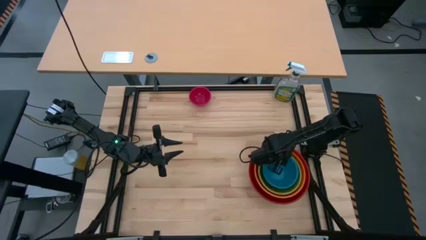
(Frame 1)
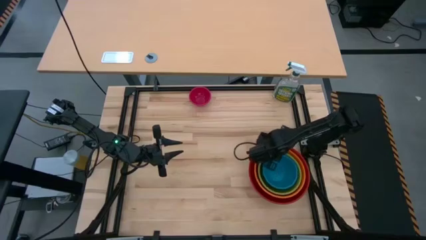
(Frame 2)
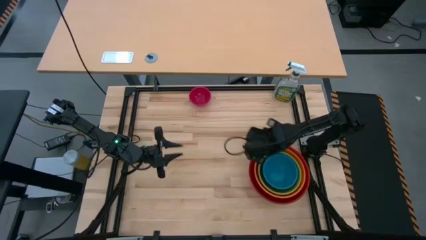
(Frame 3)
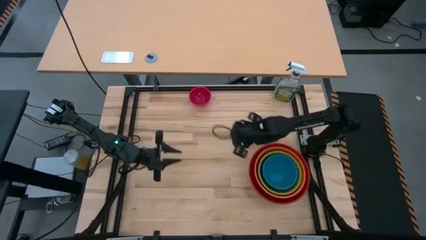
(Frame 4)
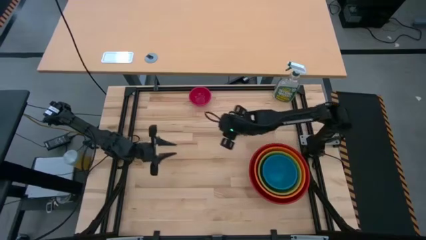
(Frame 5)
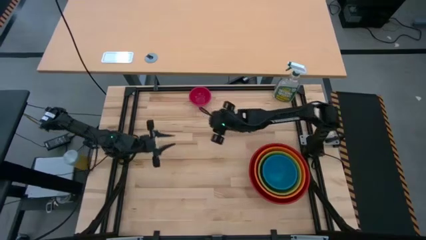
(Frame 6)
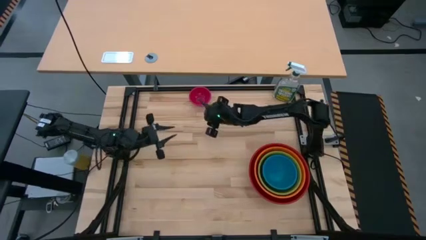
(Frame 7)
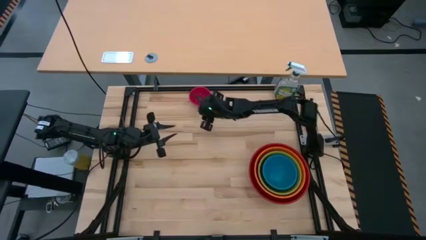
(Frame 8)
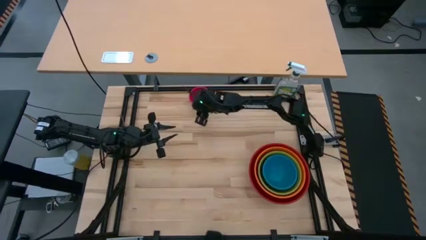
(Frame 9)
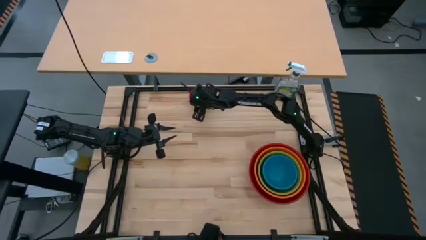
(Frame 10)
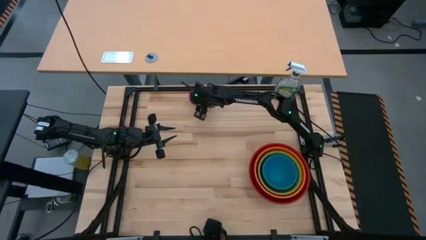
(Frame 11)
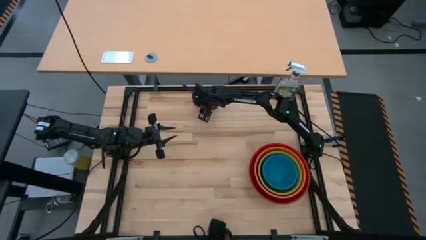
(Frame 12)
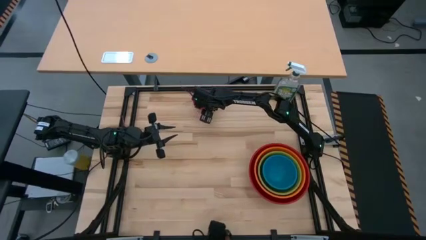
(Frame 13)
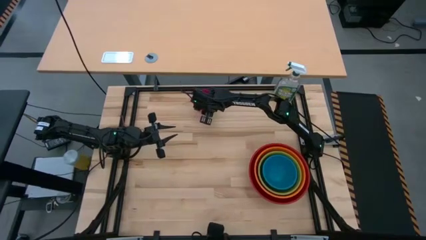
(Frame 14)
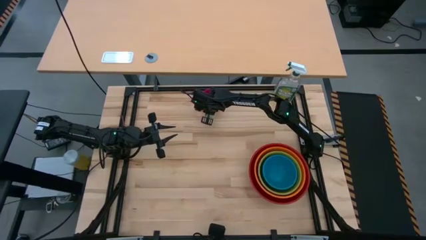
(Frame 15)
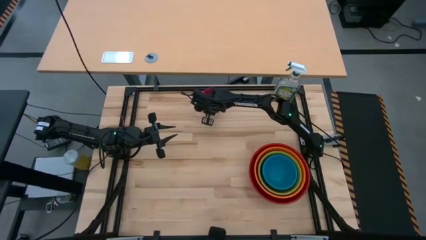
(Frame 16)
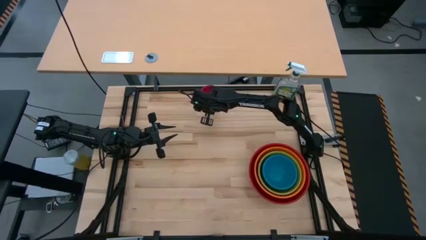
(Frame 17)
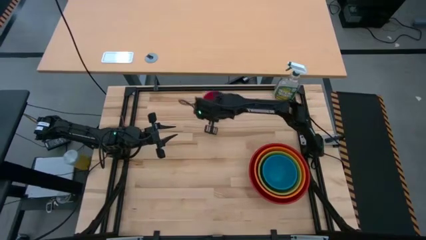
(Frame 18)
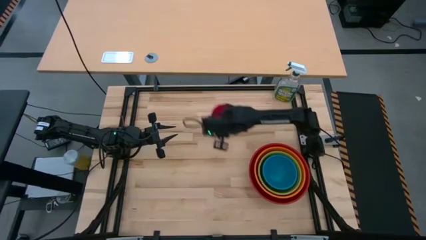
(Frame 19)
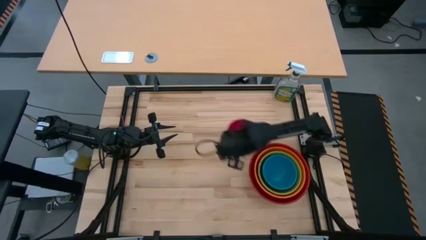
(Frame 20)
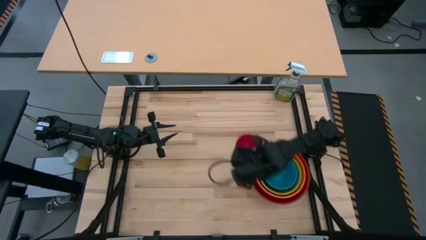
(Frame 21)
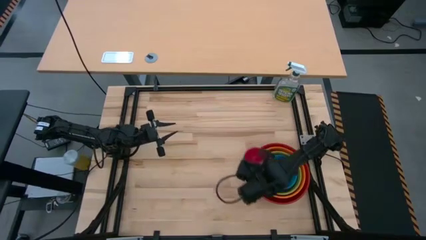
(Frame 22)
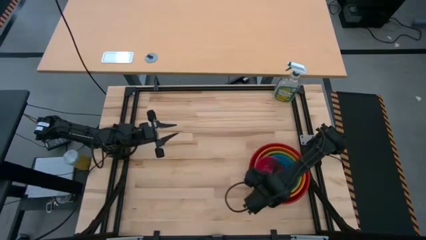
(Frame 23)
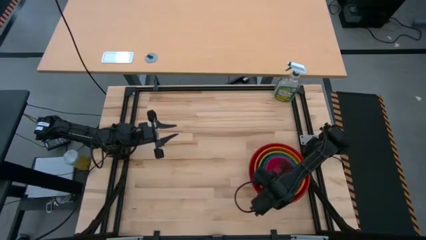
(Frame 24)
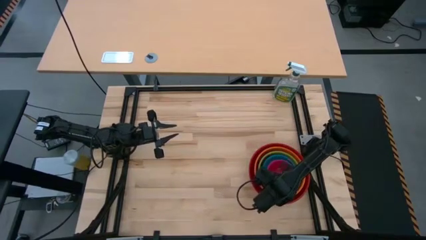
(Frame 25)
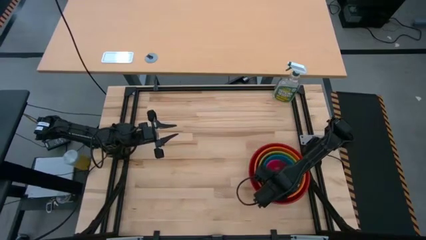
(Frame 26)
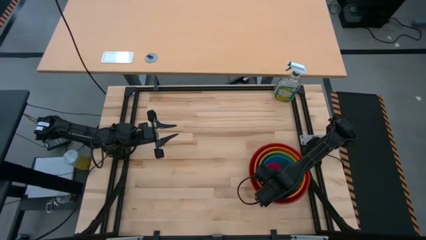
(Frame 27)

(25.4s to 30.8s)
Stack the red bowl on the blue bowl

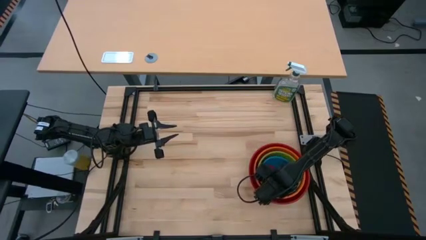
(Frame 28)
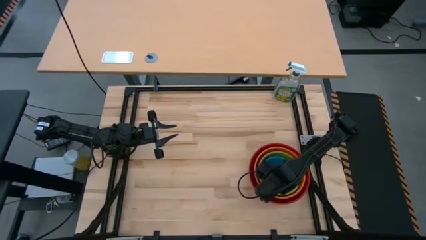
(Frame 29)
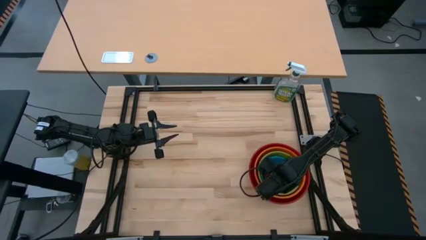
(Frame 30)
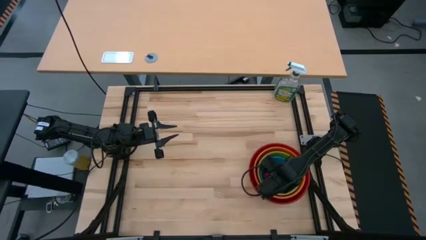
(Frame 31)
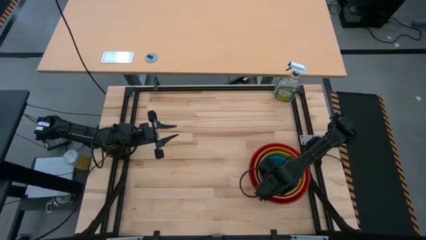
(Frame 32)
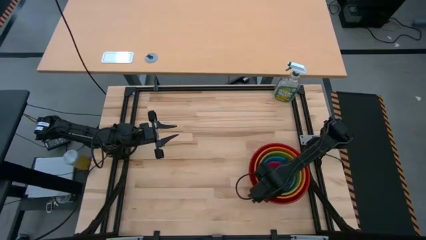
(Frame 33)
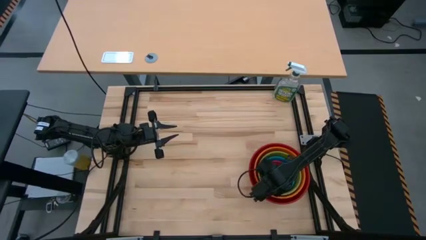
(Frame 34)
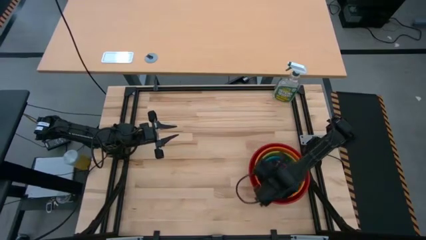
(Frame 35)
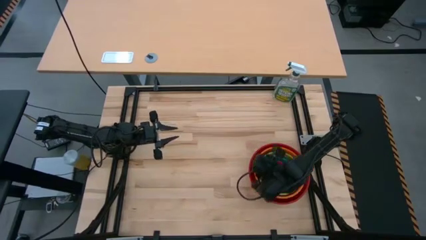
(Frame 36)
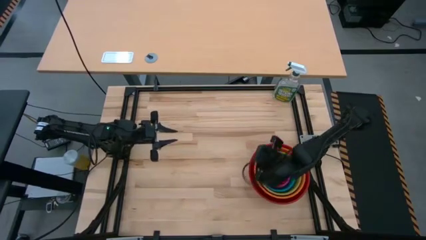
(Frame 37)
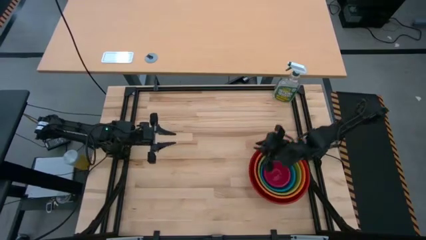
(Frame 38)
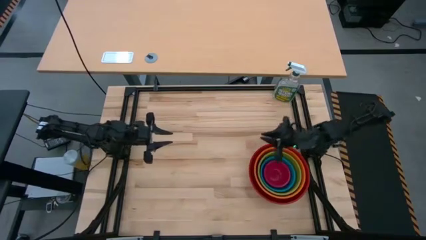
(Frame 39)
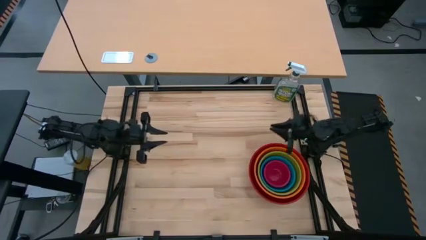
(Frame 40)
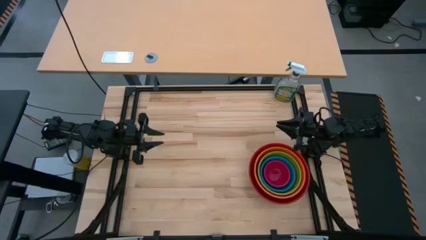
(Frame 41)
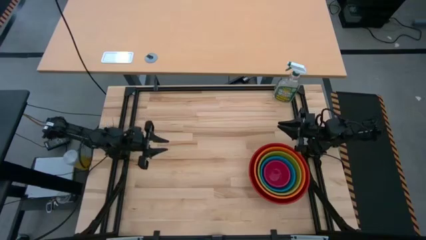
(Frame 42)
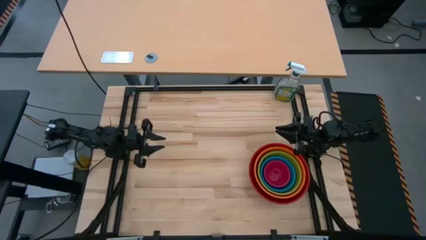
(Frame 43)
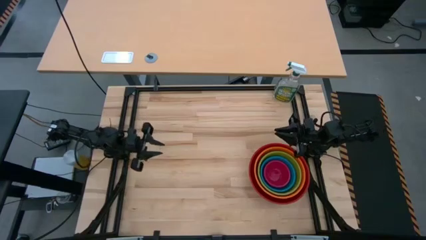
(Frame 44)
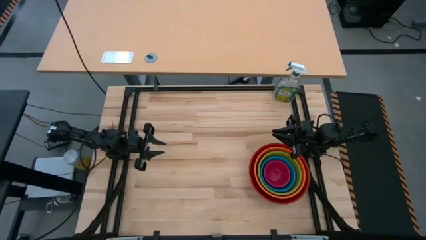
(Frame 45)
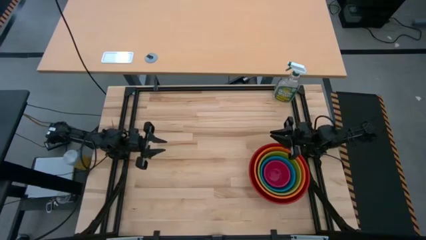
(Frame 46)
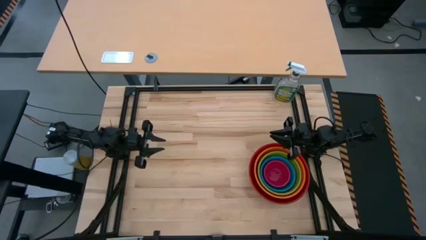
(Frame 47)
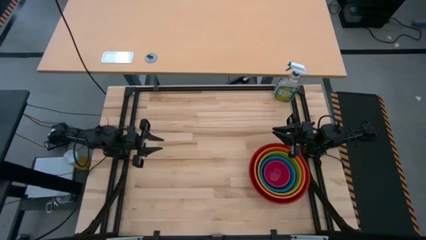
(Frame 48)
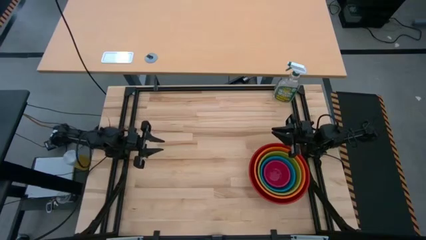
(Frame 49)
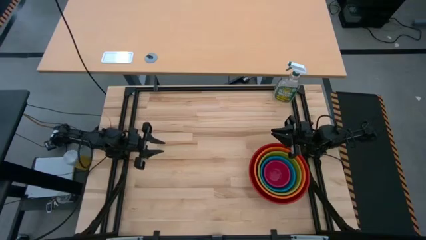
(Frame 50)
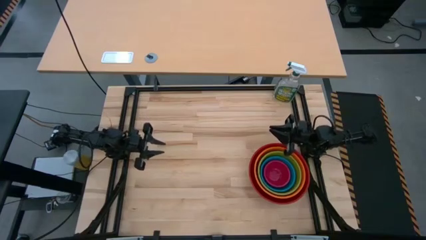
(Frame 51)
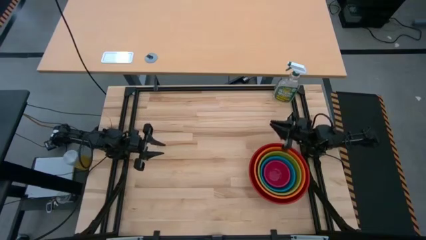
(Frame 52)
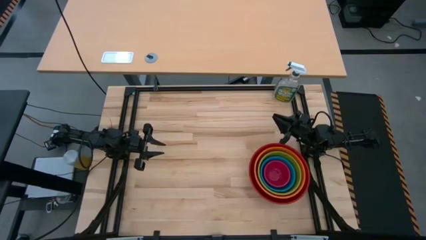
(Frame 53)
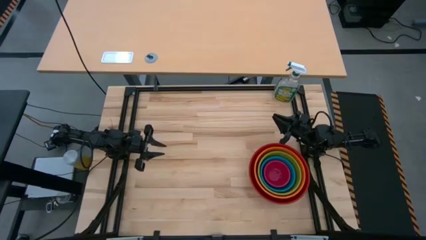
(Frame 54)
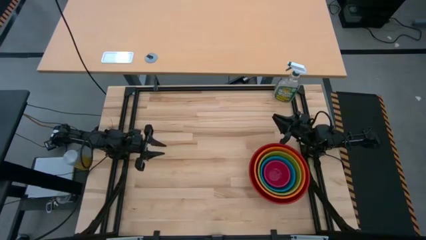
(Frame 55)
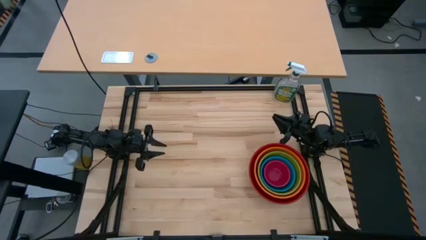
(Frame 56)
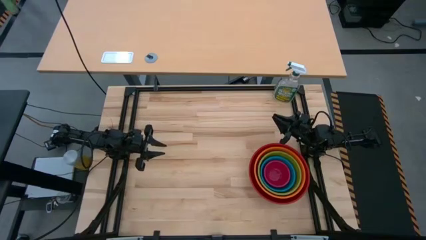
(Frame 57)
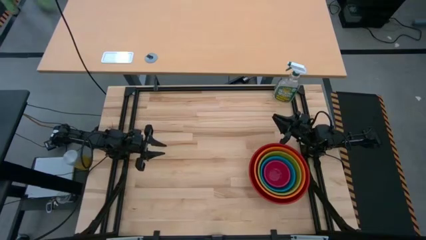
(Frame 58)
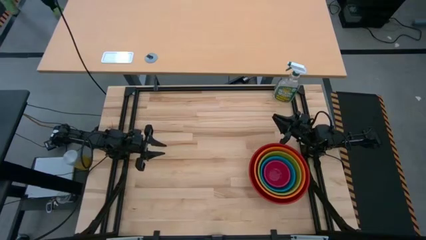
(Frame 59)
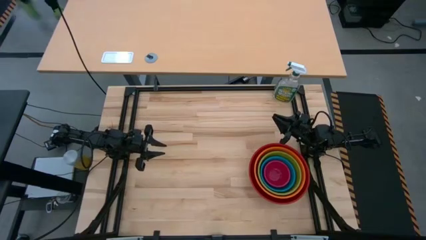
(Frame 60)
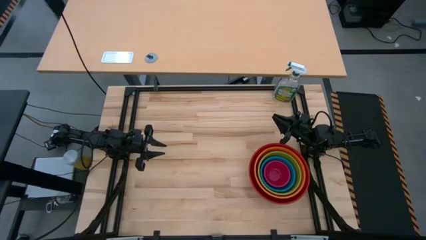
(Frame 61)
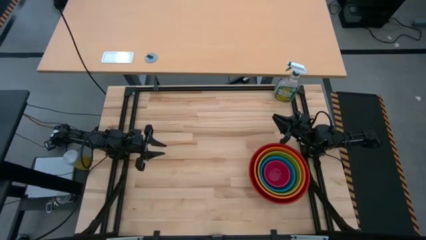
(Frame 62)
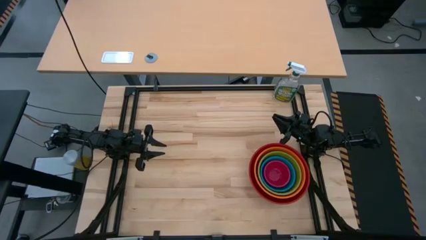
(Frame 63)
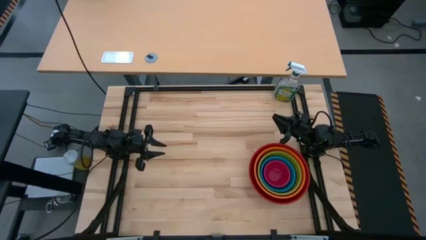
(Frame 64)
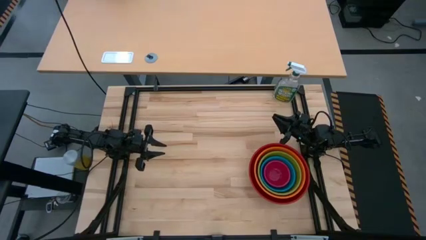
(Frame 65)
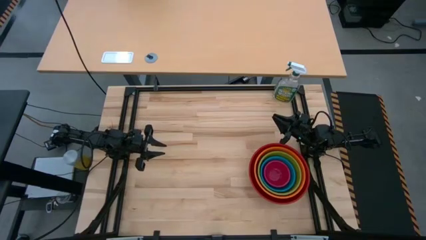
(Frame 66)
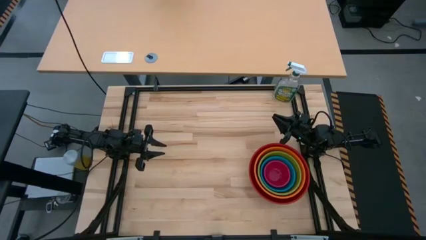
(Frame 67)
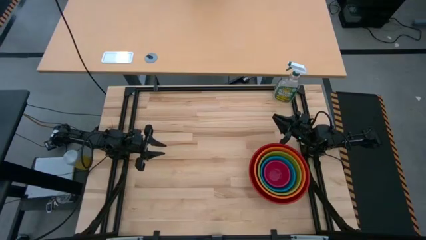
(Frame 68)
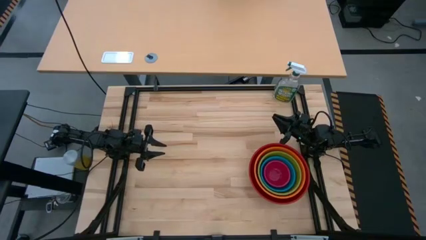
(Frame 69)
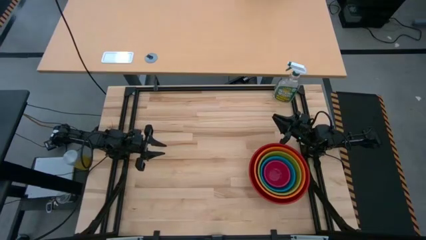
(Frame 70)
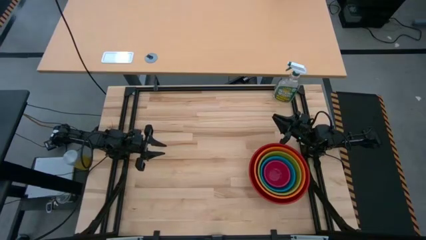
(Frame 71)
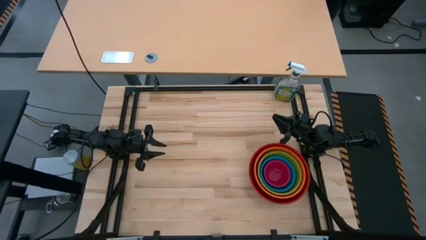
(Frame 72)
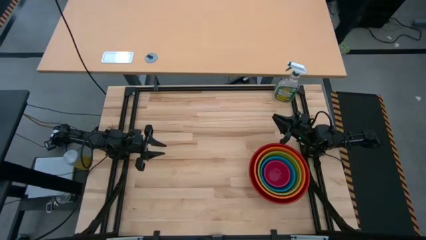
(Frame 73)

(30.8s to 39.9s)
Return to Home Position
